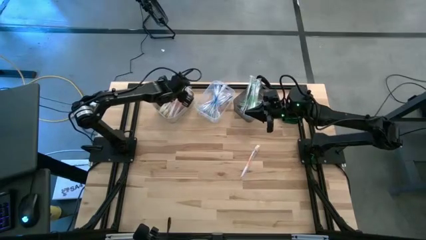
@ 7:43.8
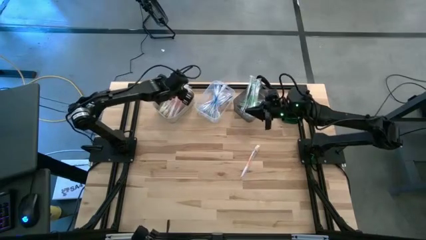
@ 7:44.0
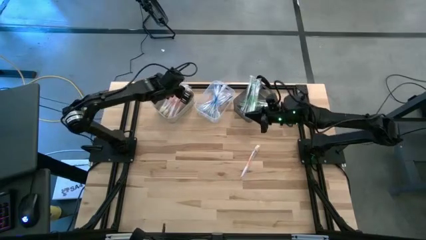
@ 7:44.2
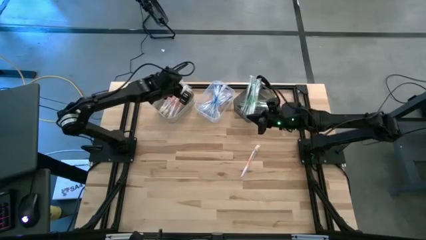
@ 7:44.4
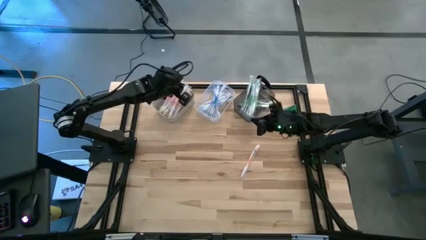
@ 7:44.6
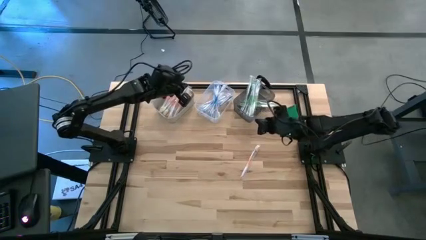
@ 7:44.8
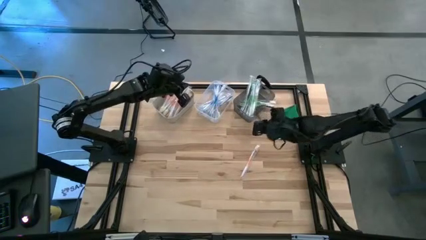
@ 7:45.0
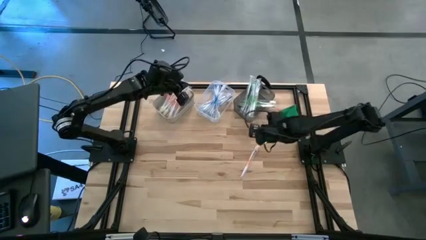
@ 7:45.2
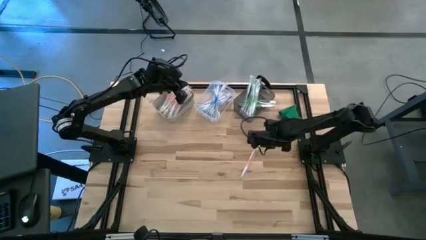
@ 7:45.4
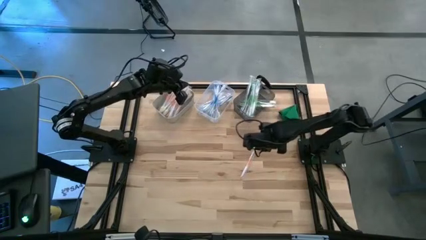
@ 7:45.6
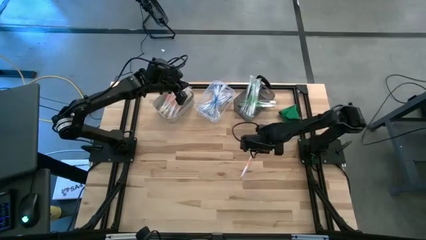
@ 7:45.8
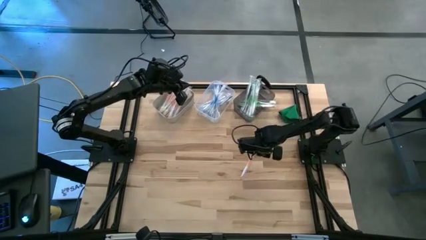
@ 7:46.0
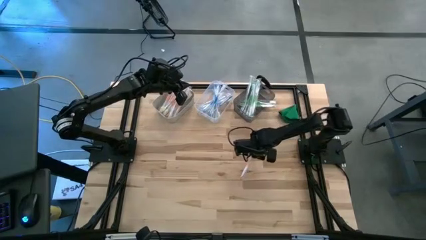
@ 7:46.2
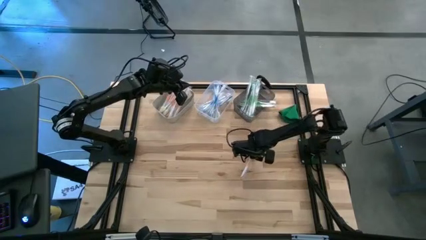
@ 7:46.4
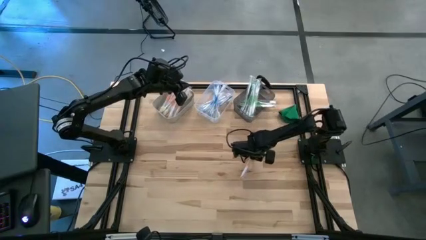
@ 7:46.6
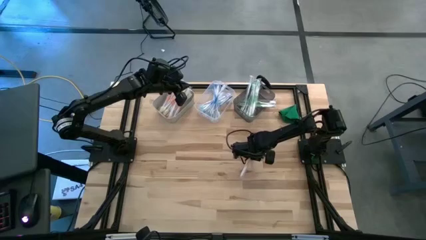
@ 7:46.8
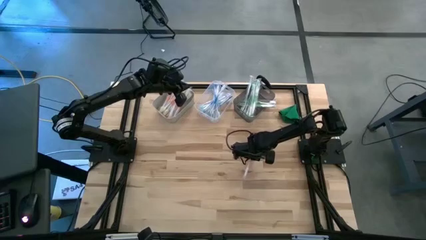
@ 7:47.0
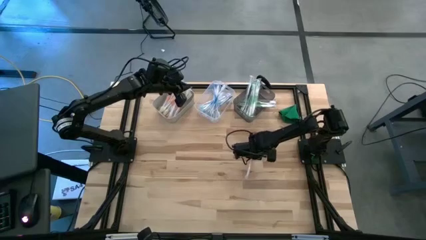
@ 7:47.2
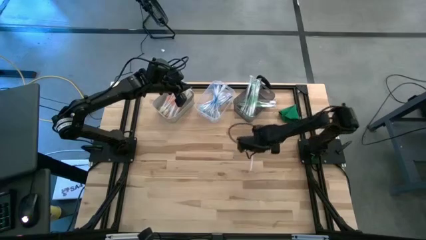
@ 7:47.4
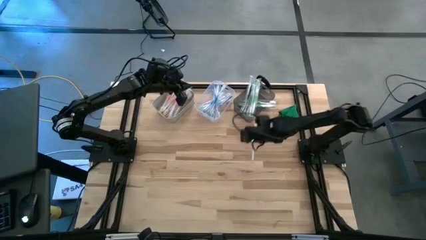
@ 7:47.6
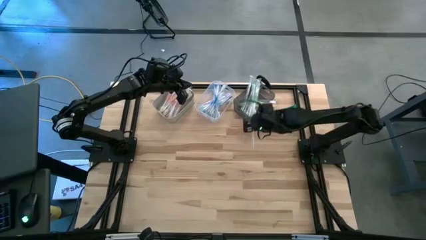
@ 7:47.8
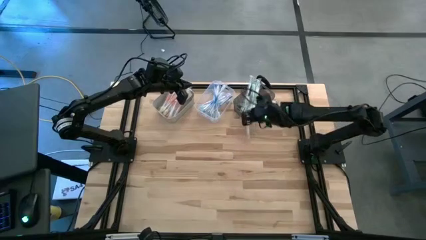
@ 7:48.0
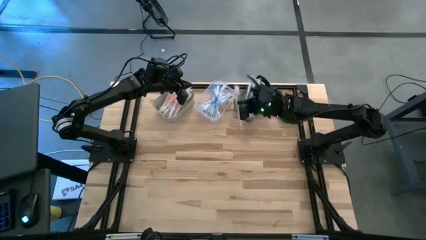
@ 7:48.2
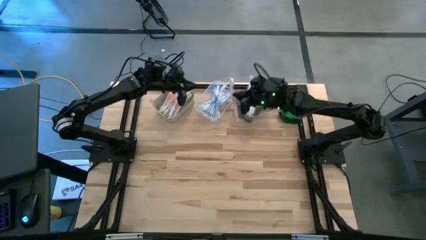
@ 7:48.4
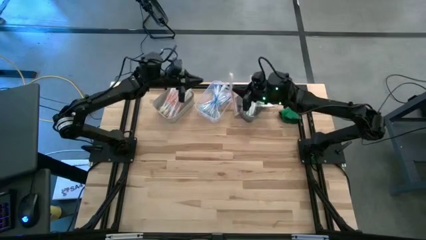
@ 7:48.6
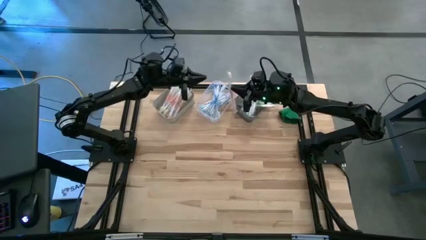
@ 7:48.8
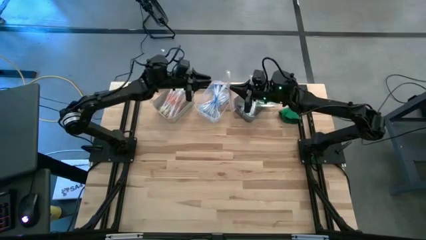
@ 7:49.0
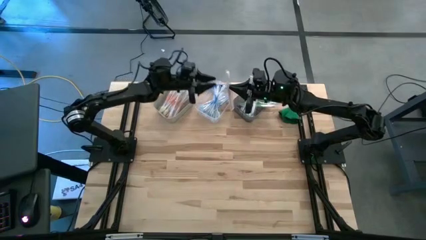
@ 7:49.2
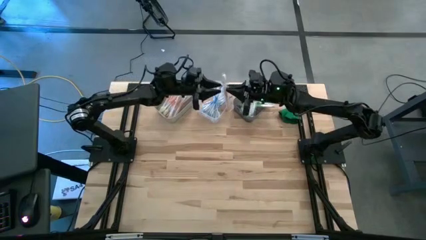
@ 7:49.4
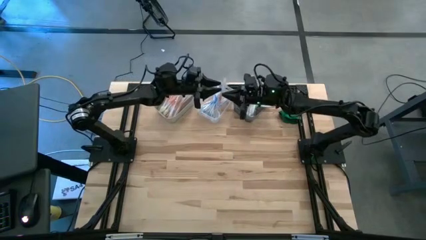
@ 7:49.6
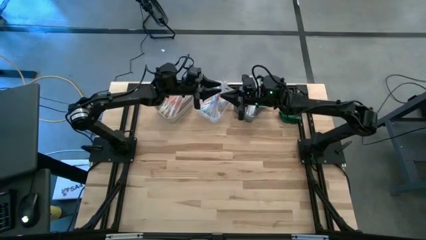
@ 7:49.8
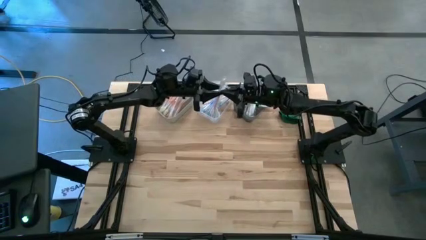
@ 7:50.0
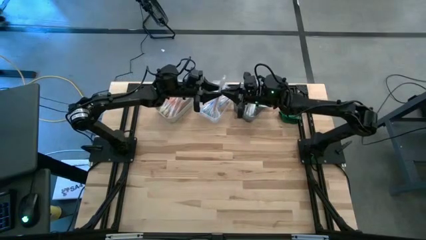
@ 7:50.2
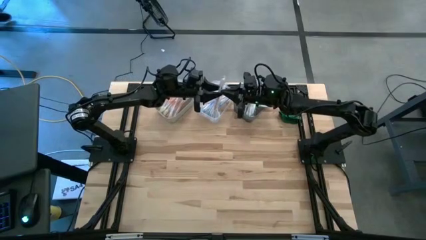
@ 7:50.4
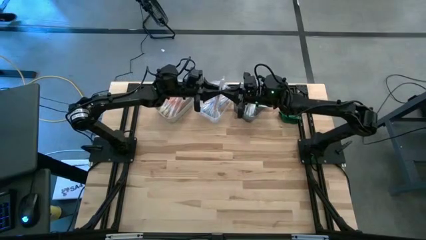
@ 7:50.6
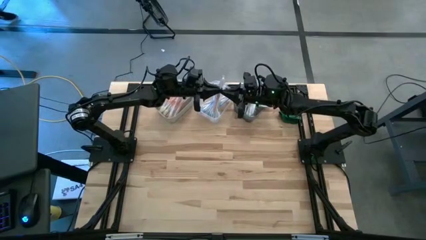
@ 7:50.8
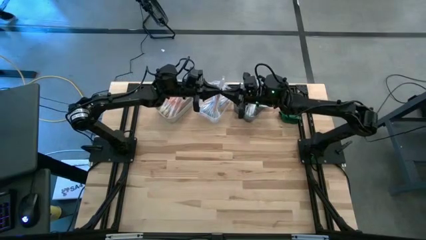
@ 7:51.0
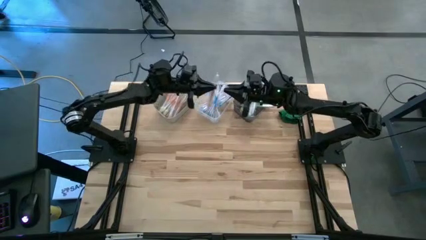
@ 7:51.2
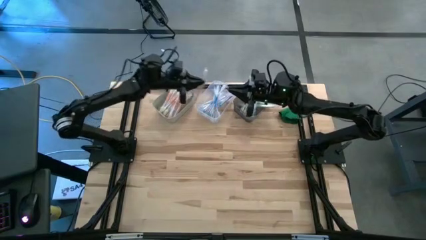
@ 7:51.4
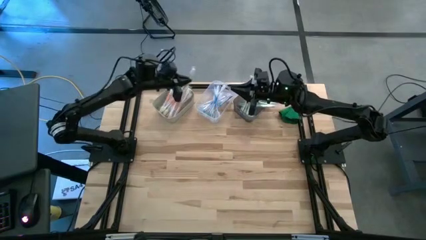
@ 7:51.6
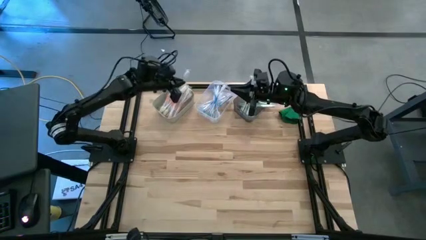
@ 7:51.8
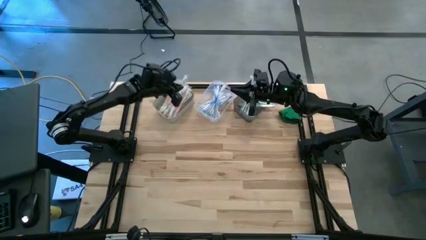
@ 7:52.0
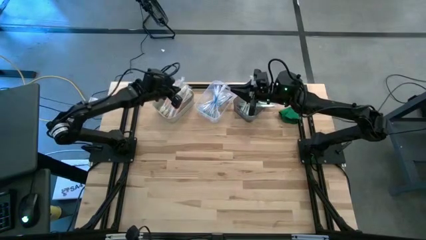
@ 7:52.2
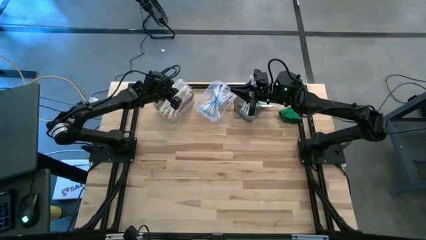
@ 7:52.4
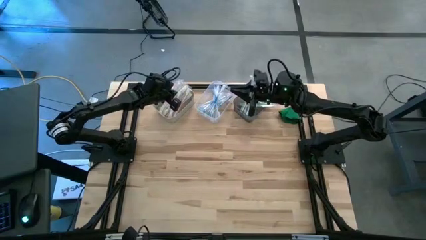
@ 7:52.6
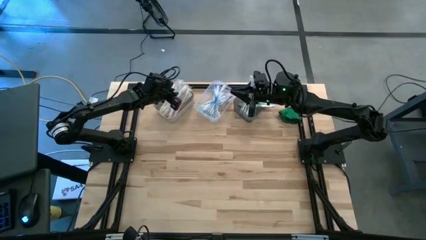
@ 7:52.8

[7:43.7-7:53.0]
Task: Pick & Place Toothbrushes
Put the orange toothbrush into the white bin

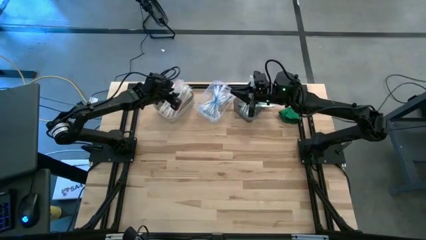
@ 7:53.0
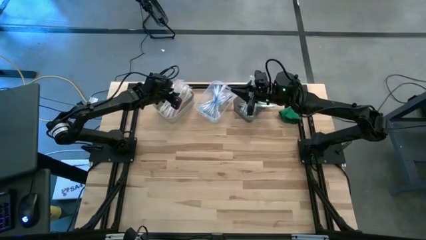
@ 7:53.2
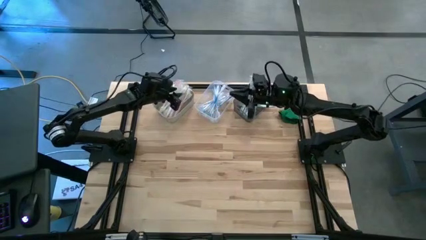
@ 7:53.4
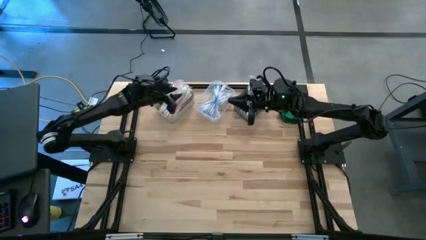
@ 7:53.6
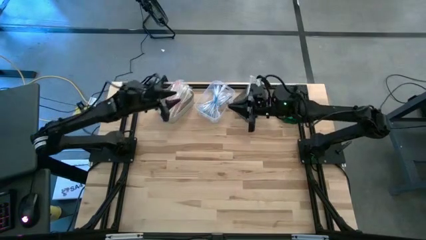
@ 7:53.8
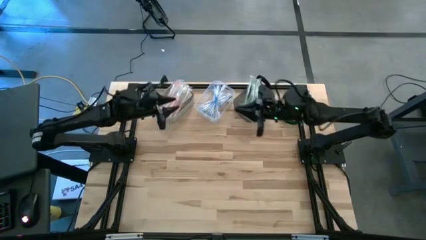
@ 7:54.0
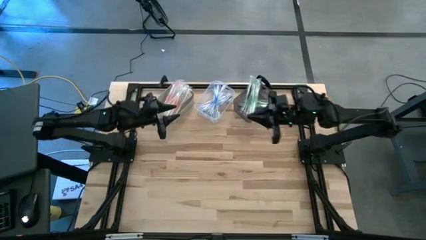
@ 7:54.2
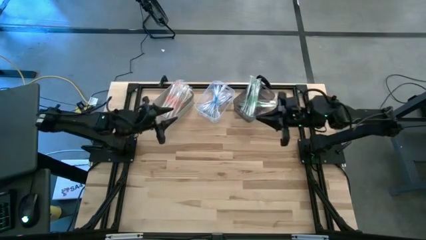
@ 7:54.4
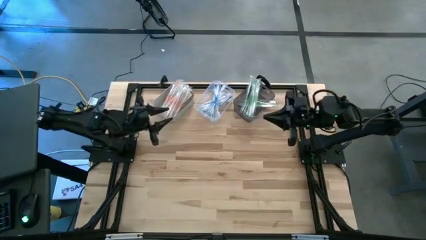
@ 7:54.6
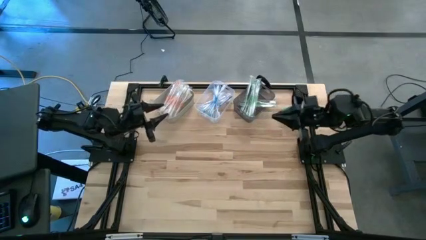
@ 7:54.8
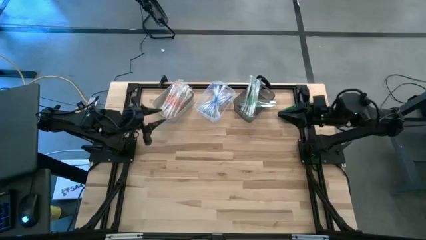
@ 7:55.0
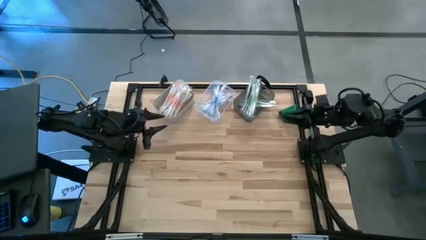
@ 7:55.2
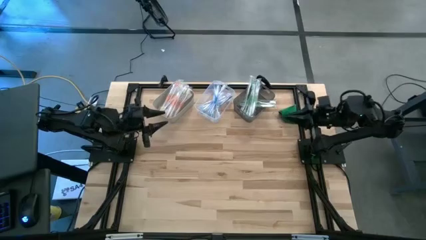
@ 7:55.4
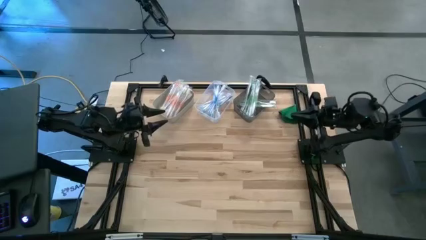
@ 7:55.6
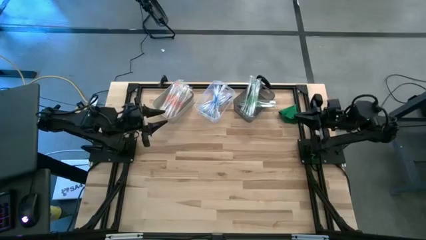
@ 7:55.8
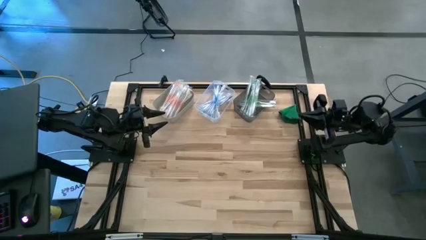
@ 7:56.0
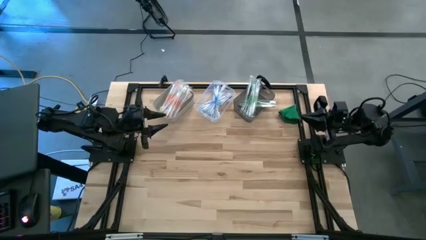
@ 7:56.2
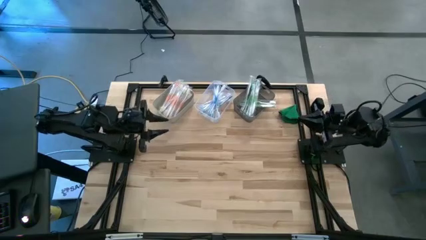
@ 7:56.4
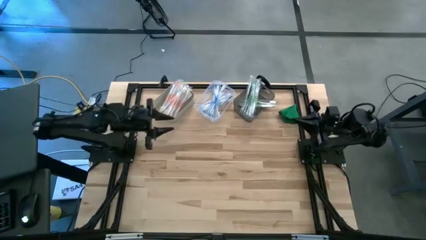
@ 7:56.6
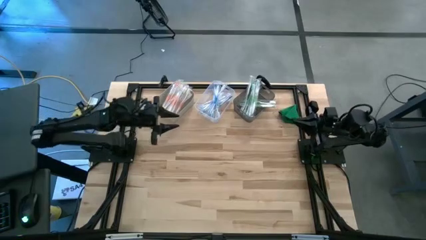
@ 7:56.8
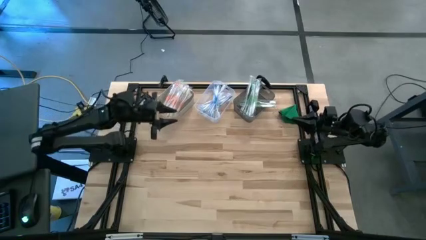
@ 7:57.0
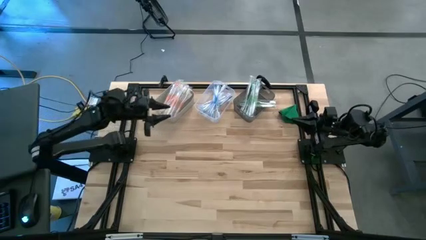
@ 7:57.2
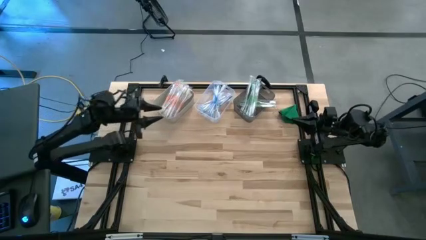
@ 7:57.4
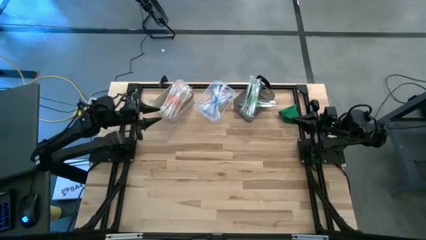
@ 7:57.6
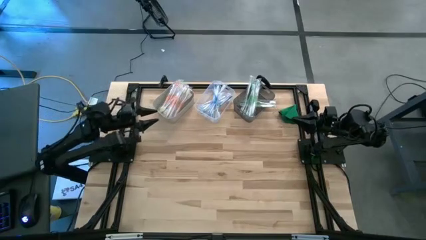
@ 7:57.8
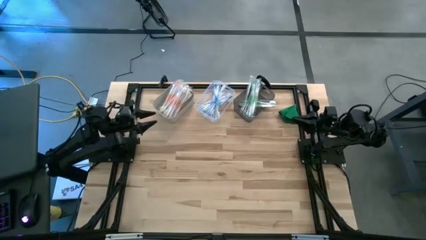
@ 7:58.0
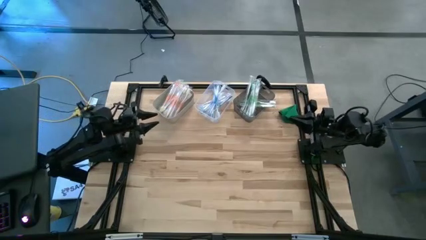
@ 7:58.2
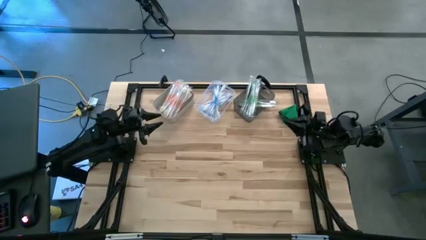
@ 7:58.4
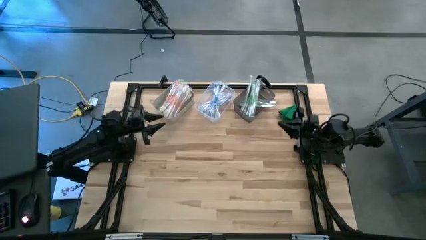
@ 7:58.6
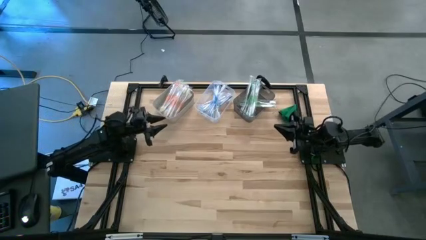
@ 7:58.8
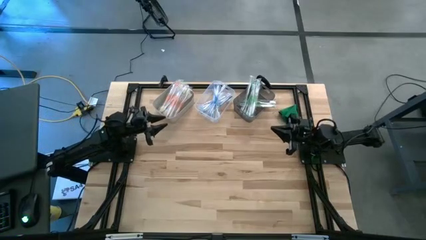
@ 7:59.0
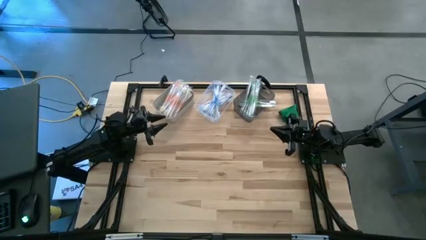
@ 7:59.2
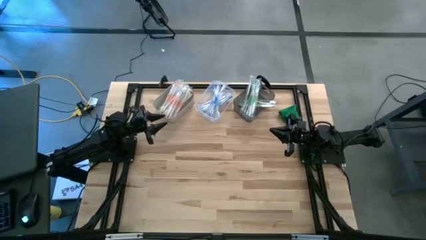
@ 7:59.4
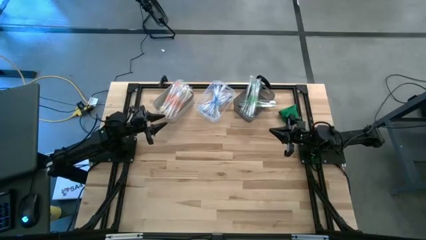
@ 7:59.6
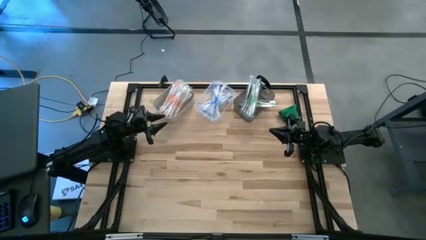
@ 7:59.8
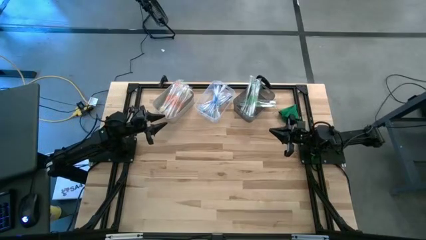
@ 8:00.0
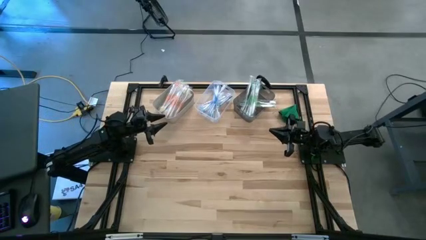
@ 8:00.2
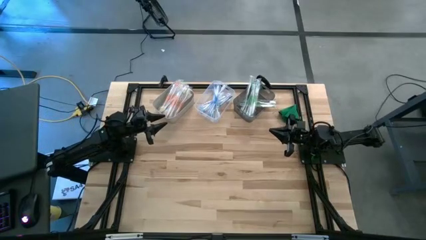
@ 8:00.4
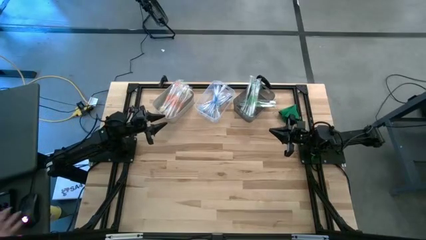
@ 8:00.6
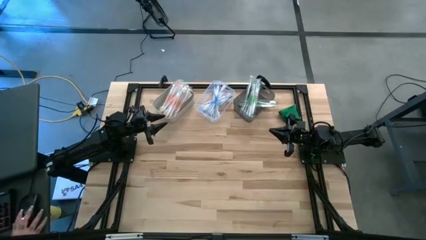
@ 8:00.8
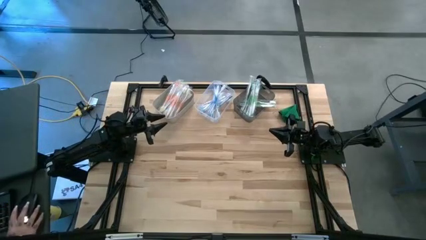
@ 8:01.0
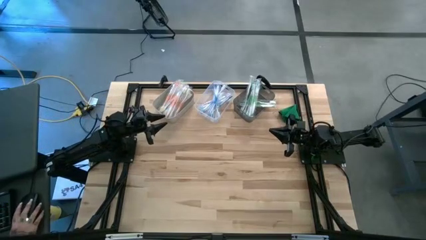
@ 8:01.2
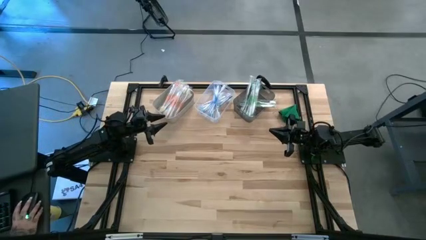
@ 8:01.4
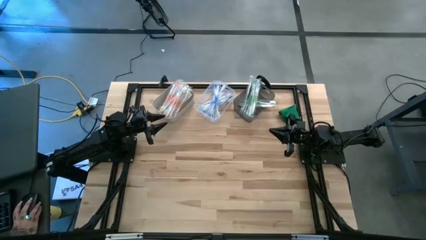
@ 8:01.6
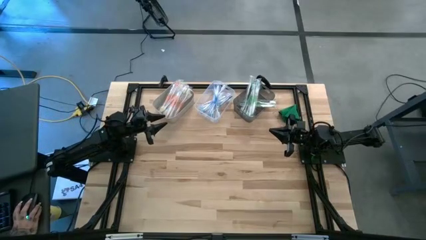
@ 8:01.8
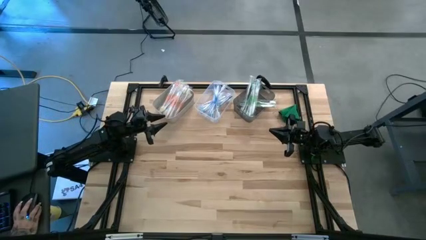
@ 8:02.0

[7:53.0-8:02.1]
Return to Home Position
